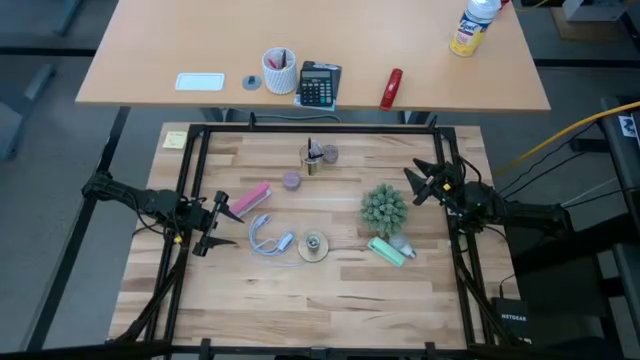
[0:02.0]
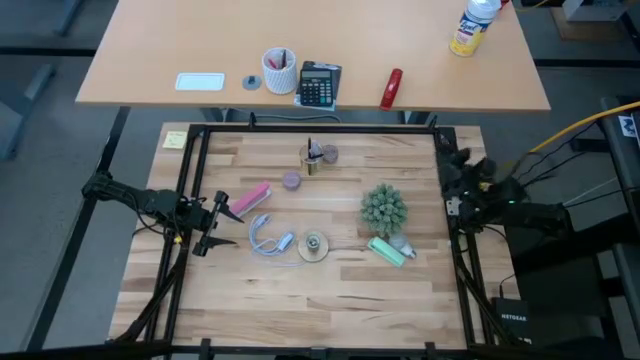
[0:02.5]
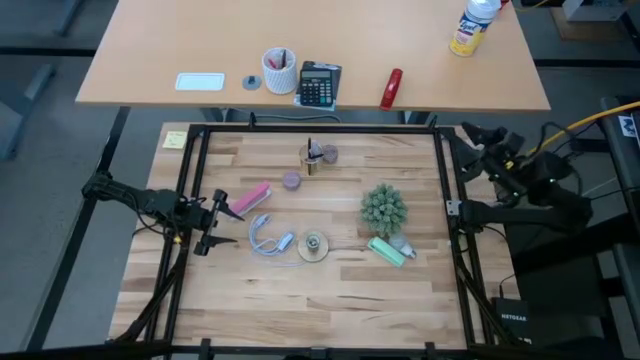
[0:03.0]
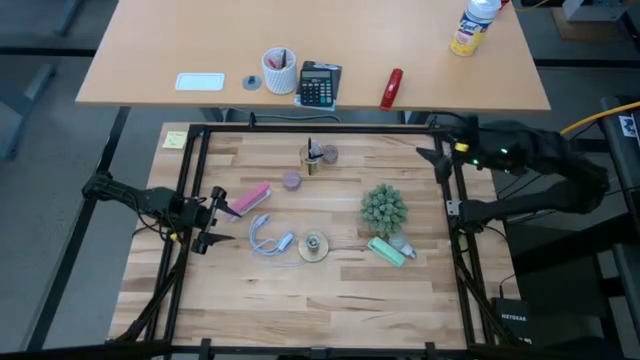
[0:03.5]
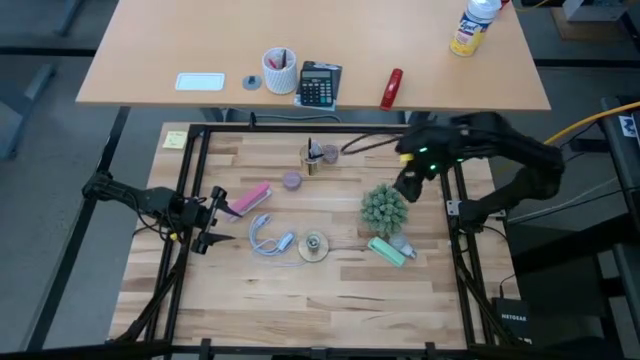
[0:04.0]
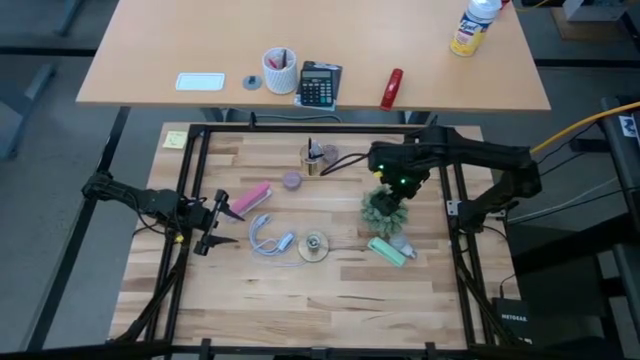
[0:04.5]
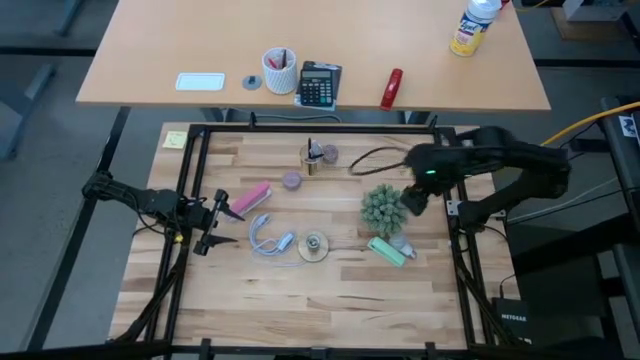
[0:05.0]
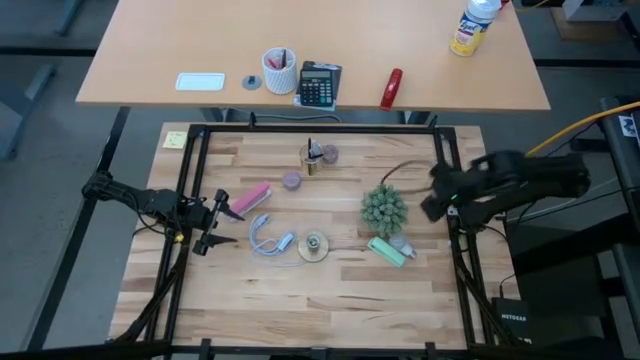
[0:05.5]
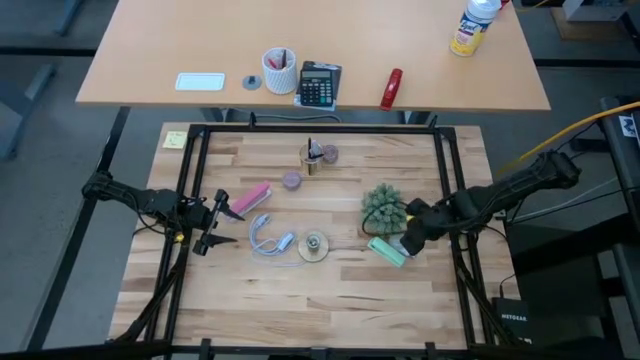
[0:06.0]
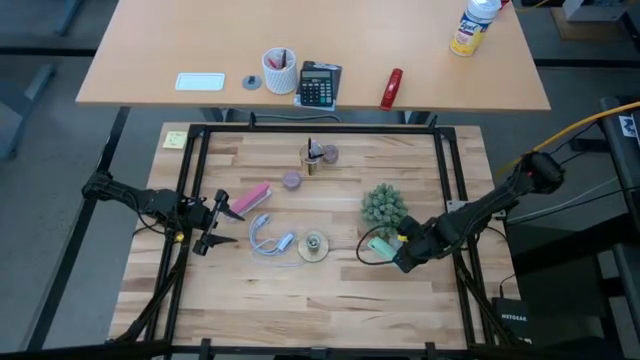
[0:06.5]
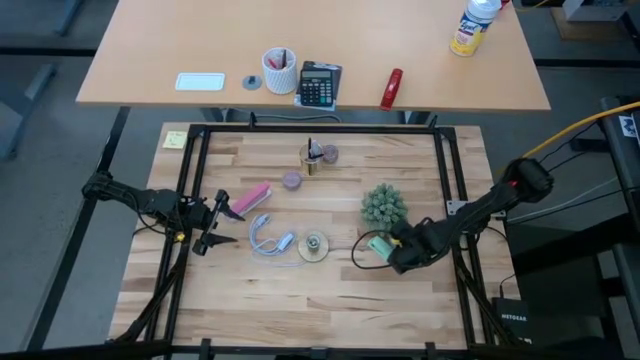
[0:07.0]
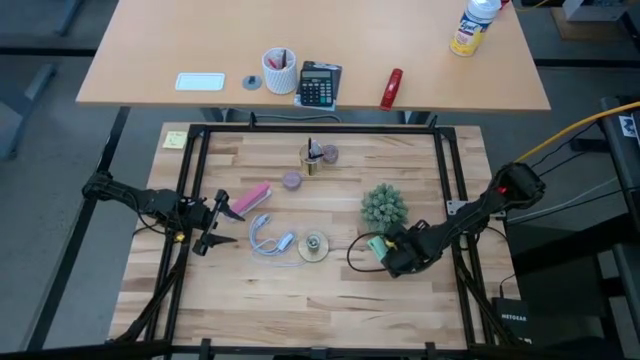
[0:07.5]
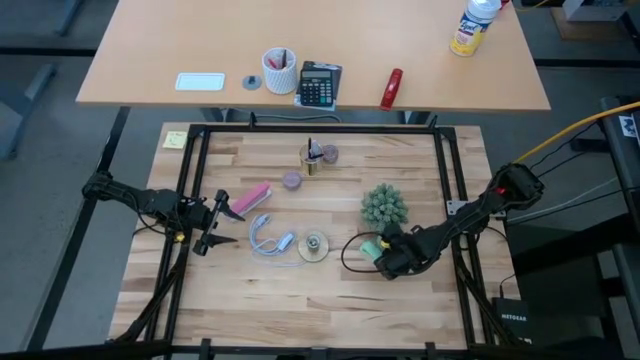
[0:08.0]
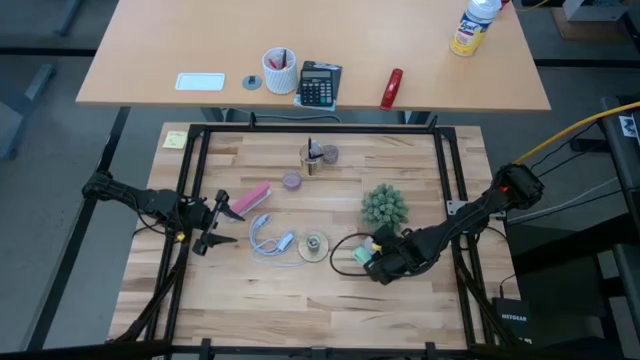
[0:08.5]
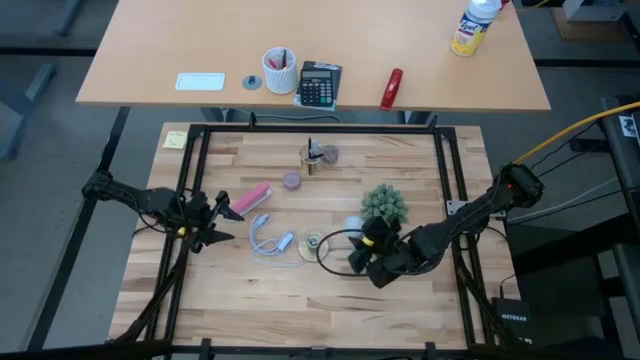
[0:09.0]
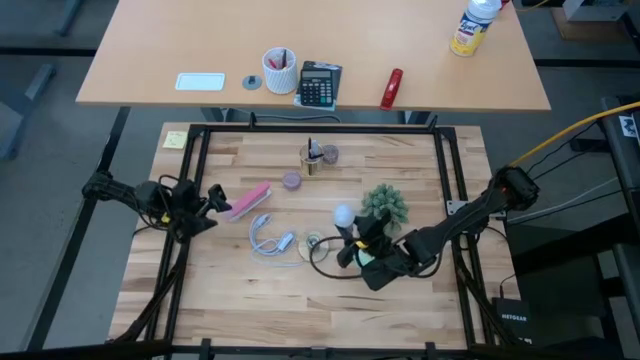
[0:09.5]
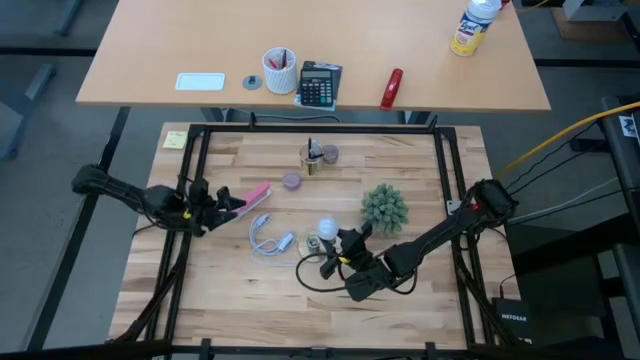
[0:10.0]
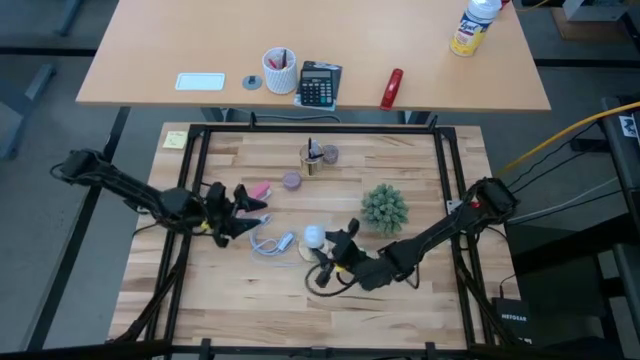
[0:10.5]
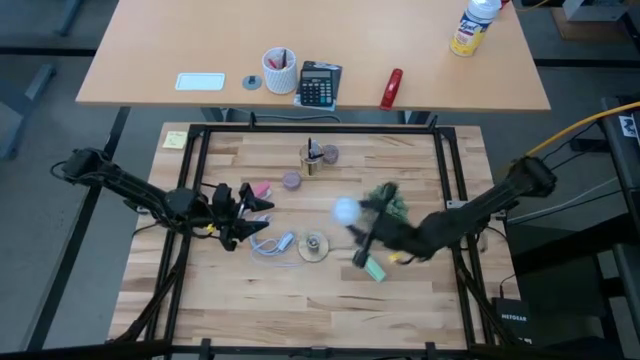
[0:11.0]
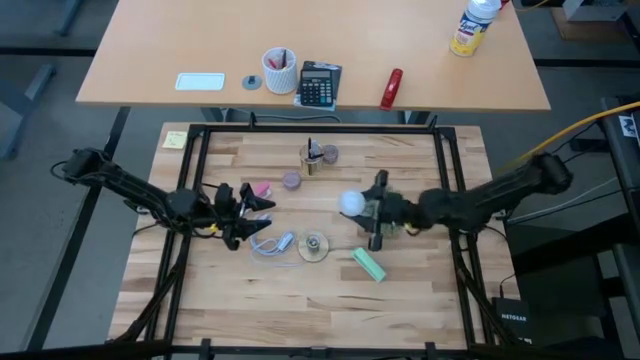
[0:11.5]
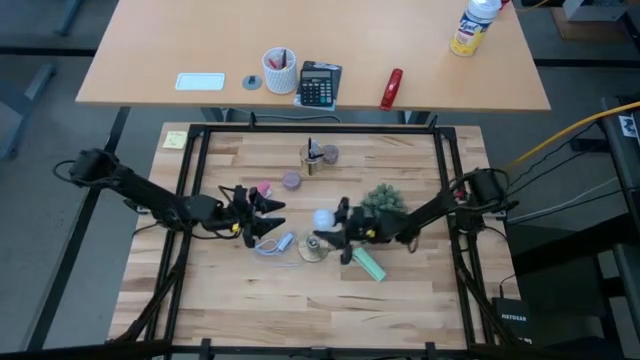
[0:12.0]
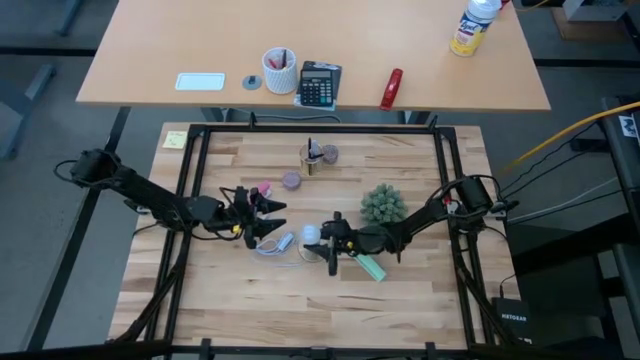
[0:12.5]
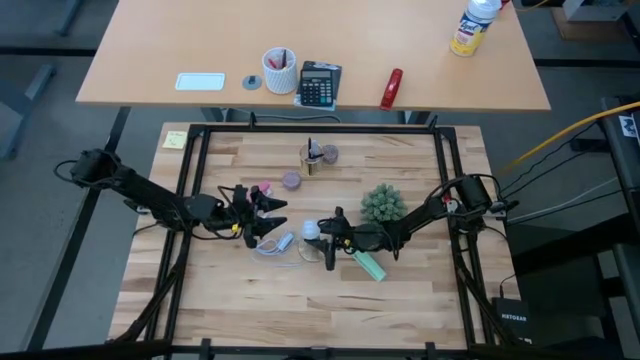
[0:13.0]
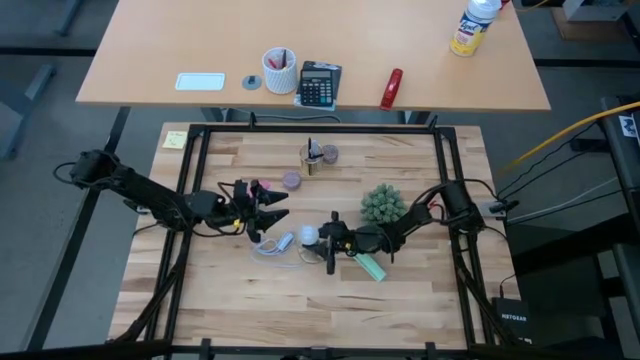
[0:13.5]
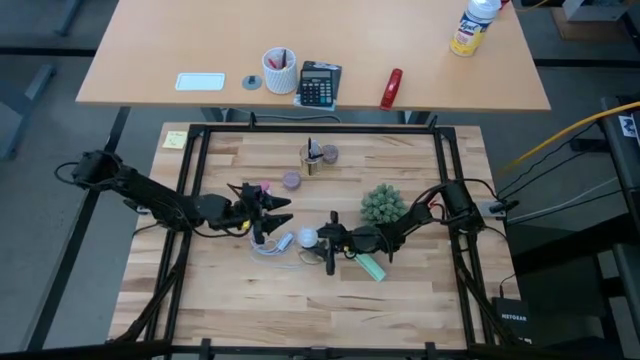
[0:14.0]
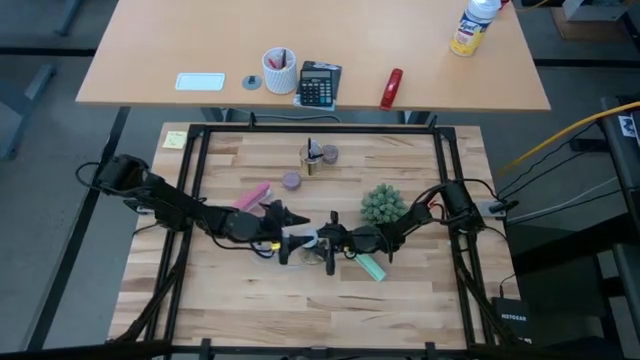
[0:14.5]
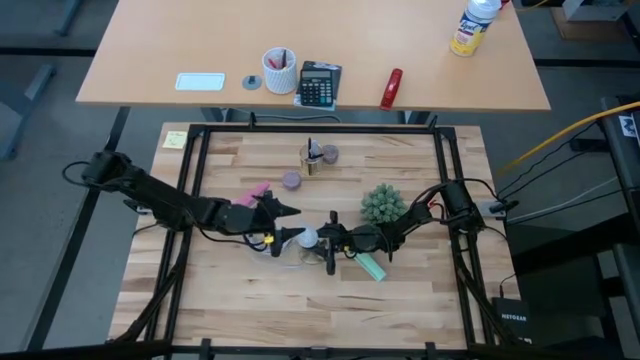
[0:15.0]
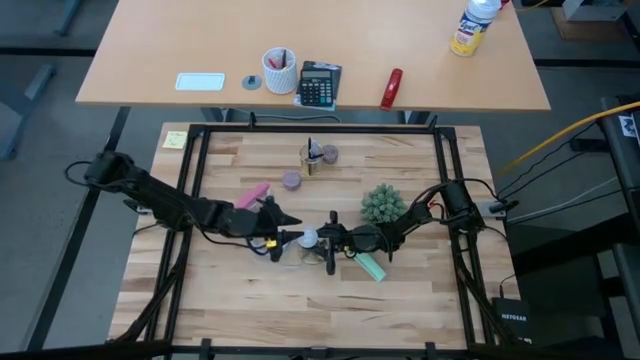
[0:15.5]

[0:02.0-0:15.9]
Task: Screw lightbulb
Insert the lightbulb into the lamp
